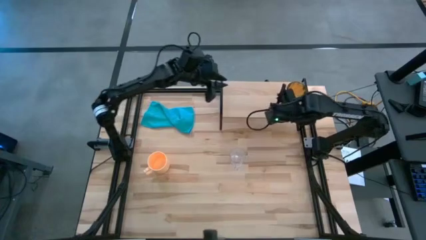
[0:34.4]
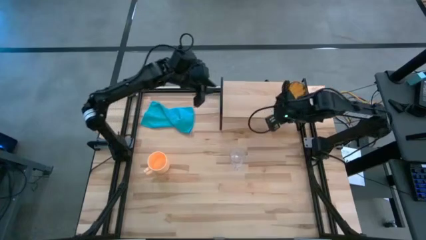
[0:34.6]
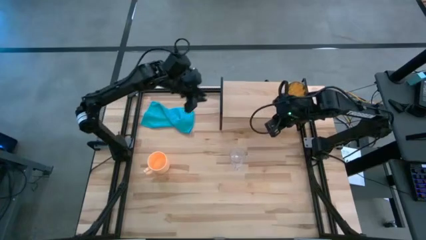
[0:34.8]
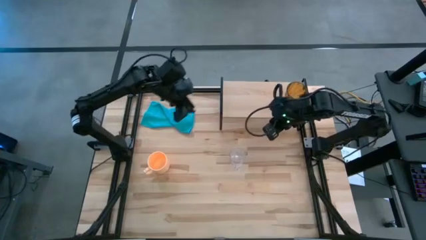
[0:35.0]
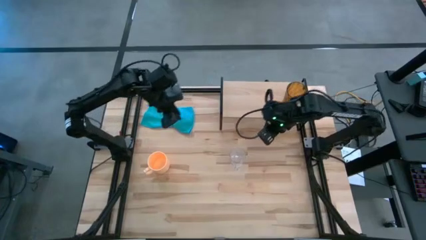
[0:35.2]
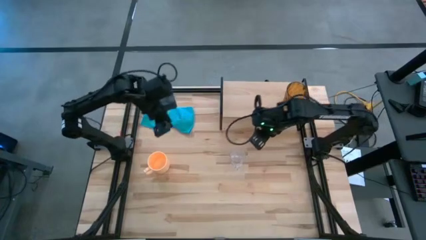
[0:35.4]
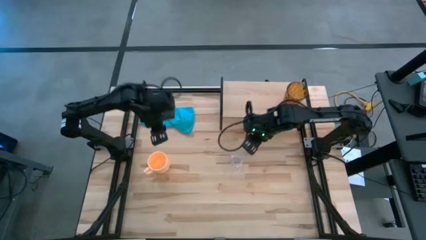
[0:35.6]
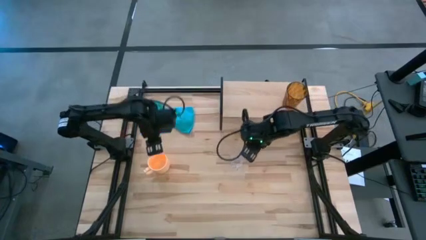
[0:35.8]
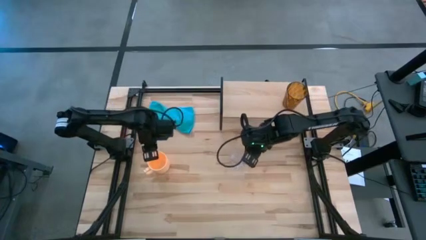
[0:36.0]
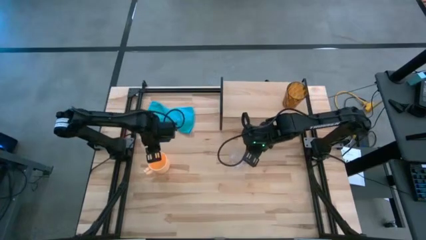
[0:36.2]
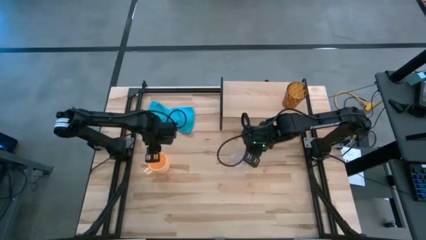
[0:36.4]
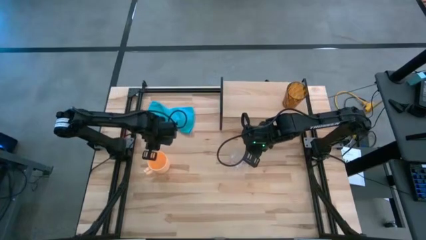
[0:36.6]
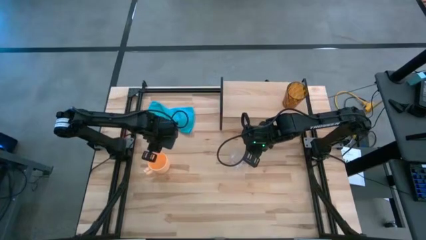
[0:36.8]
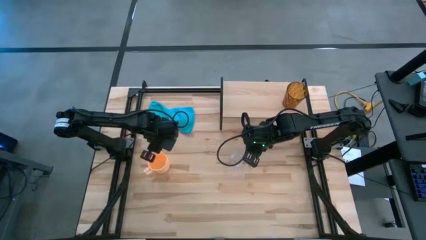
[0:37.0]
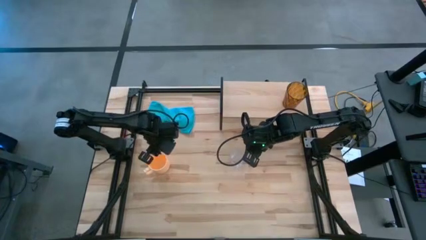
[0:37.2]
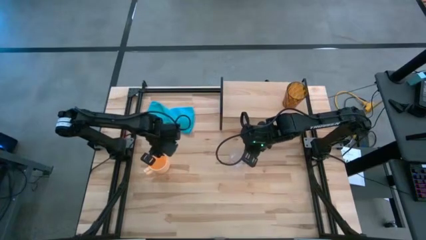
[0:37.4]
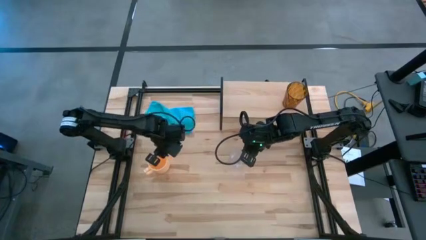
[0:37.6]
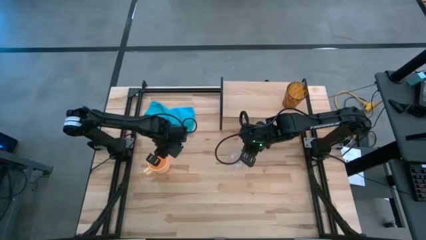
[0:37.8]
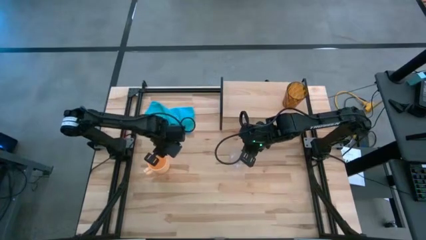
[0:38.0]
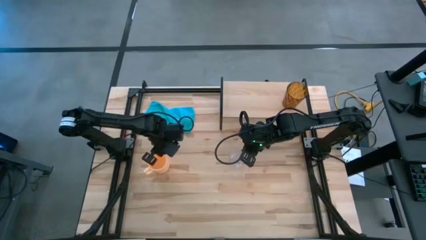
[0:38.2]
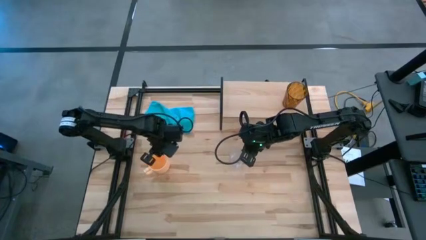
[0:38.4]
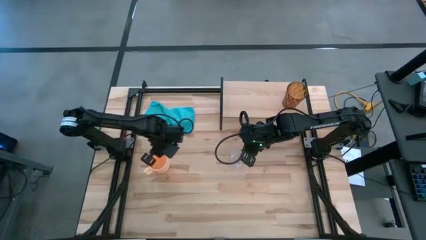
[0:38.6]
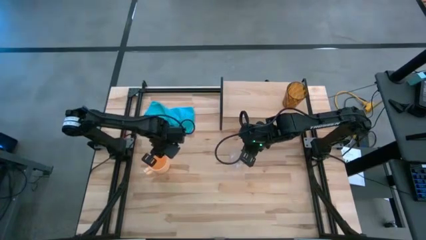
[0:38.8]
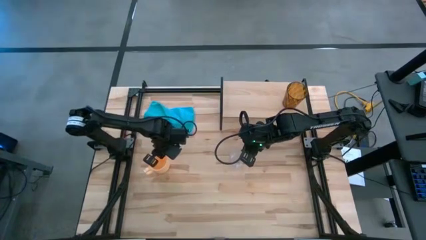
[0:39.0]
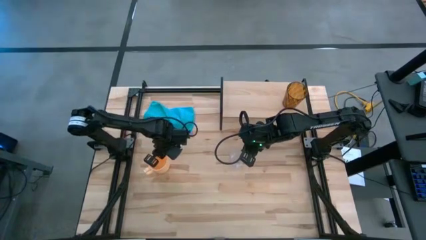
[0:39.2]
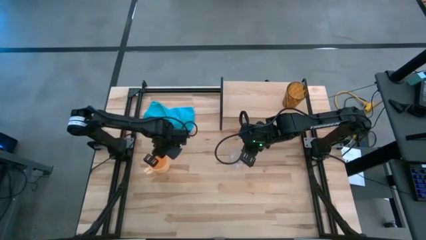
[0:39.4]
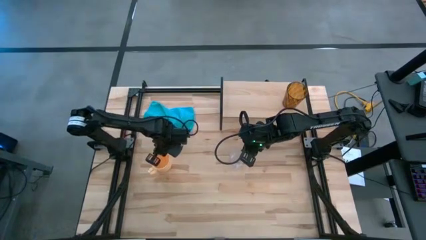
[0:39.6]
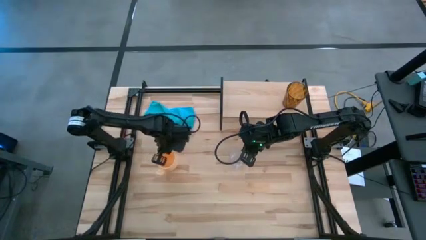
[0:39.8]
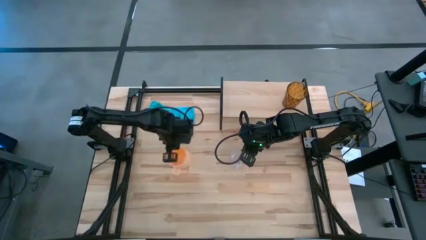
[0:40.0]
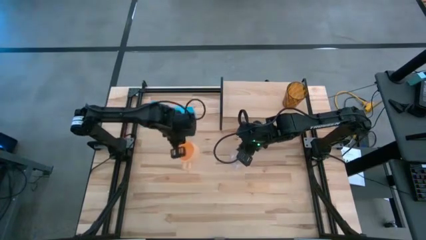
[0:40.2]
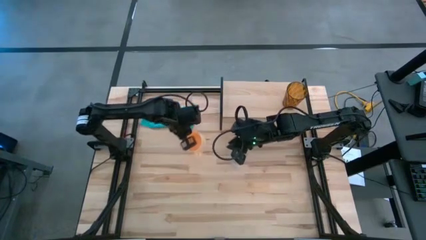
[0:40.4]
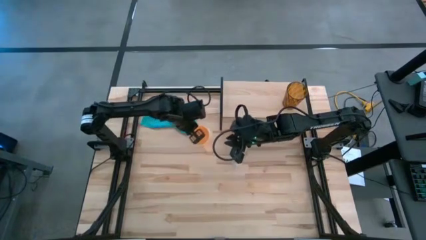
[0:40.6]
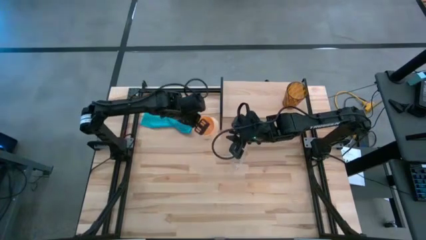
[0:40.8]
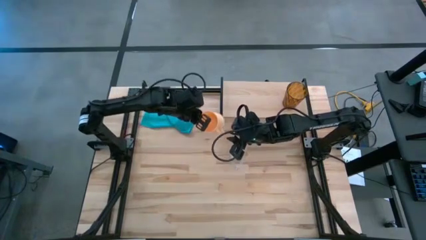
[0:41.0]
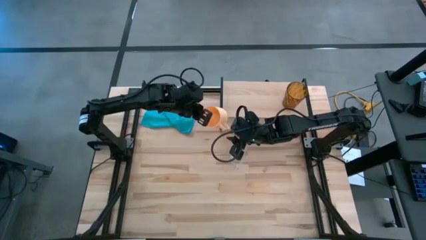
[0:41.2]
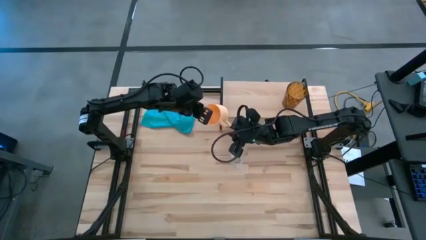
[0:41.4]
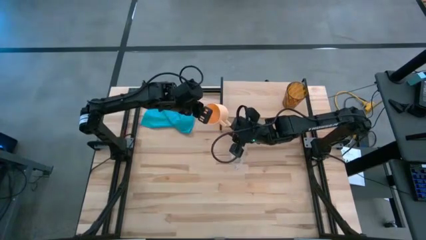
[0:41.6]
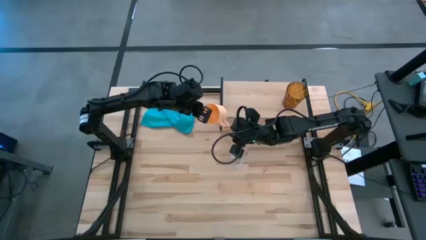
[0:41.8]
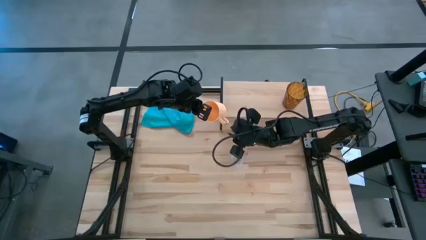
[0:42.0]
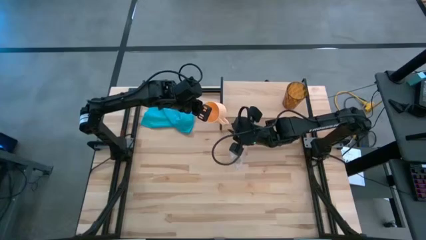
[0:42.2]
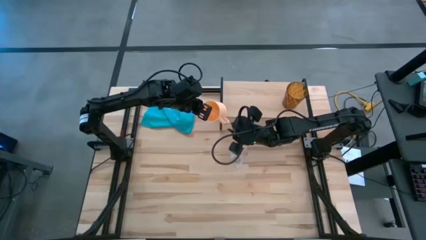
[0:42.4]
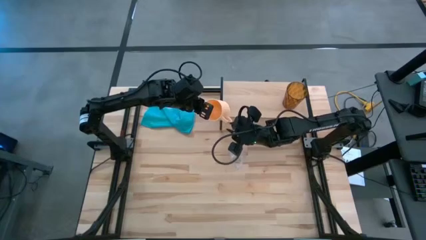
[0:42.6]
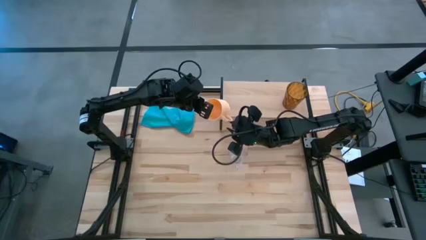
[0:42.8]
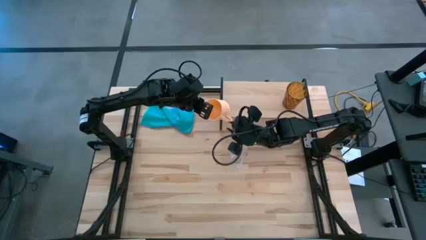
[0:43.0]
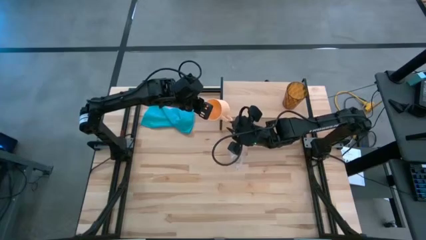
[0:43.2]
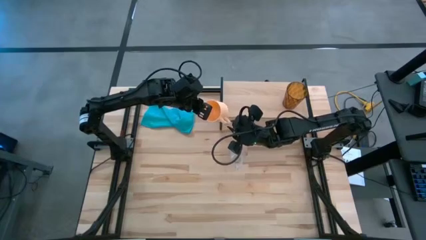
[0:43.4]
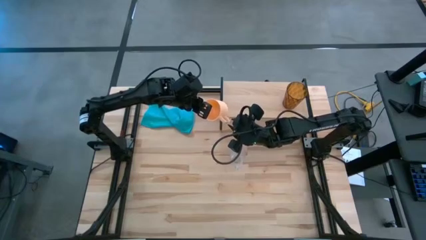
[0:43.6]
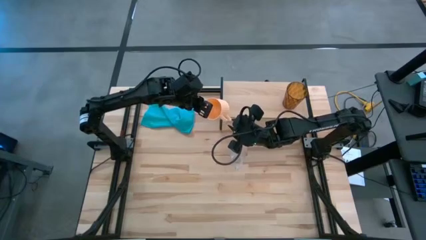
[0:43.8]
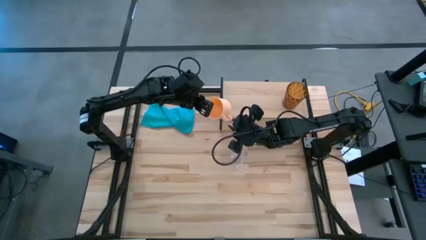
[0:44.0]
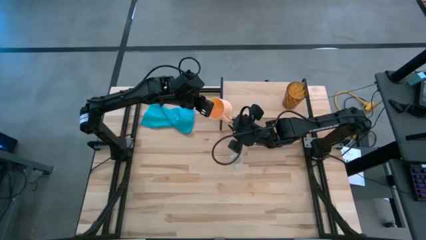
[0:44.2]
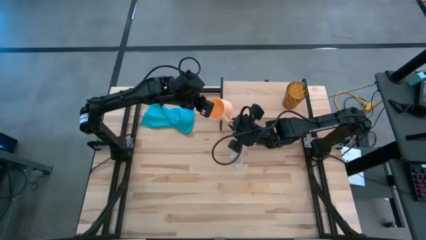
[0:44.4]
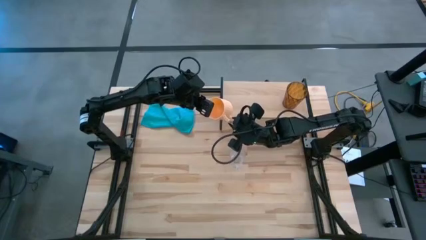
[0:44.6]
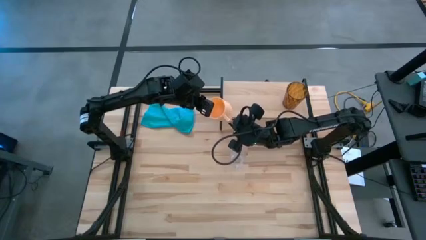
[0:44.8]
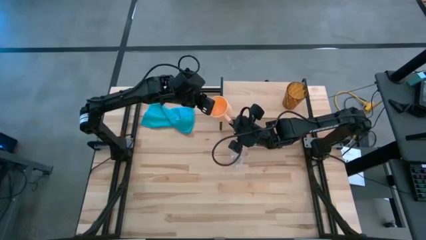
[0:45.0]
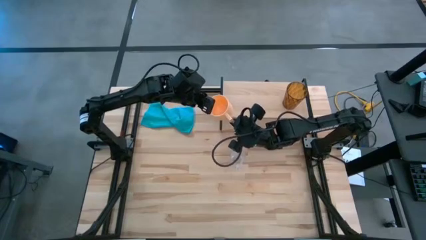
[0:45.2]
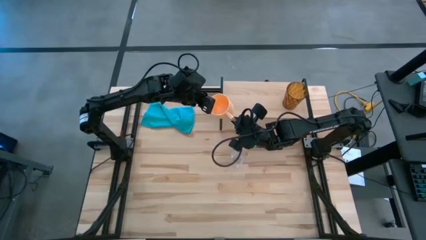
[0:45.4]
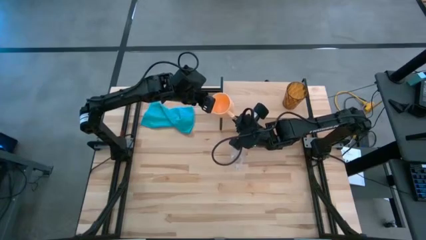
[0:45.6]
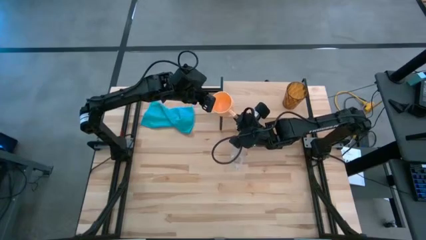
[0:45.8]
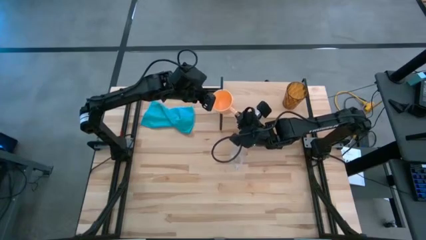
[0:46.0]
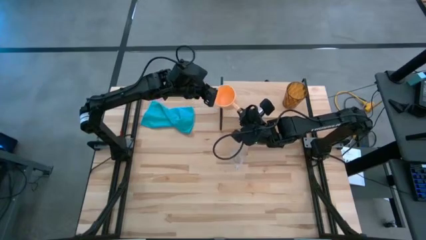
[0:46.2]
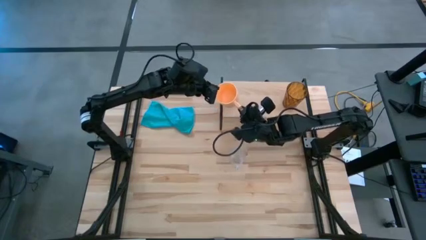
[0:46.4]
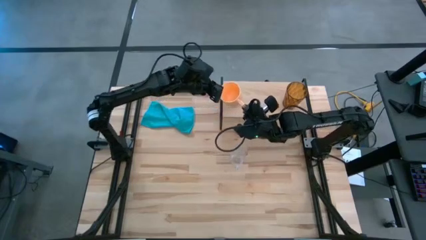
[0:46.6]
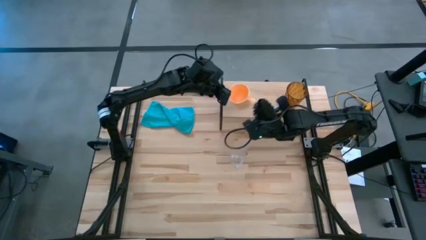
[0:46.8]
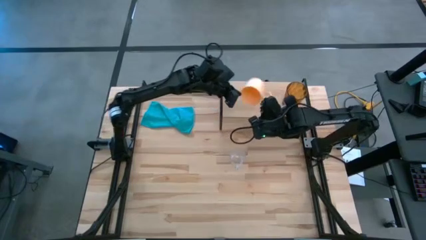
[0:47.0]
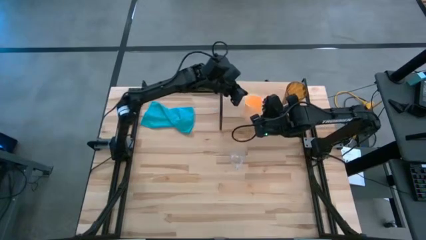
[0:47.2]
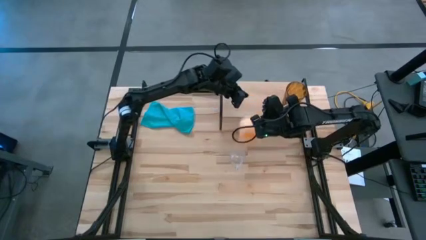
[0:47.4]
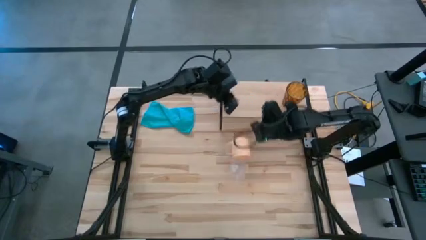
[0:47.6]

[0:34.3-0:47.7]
Task: Stack small to large cups/mugs on shelf
Put the yellow mug on the shelf
